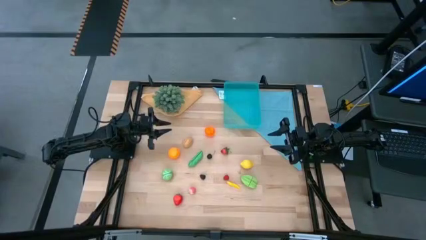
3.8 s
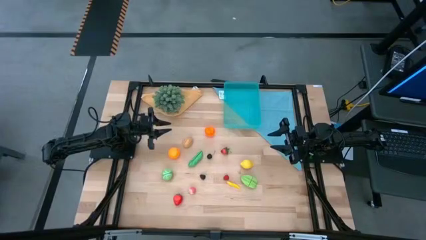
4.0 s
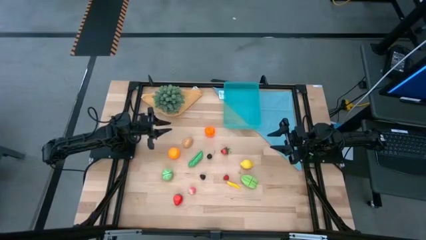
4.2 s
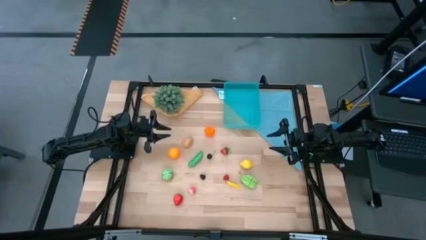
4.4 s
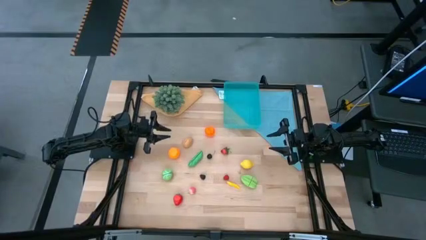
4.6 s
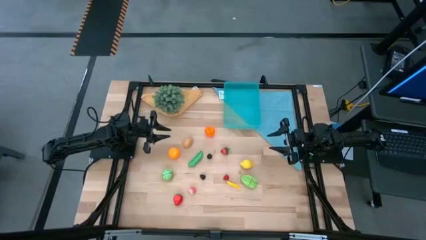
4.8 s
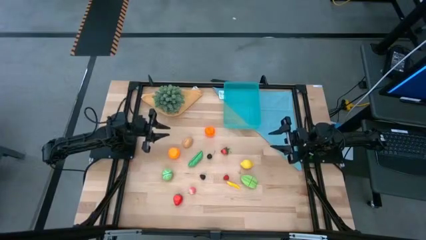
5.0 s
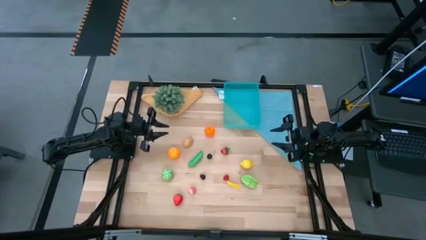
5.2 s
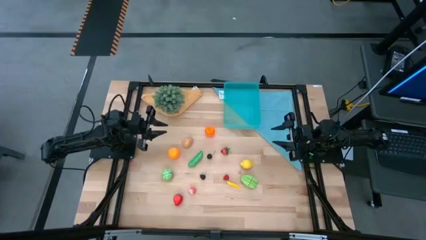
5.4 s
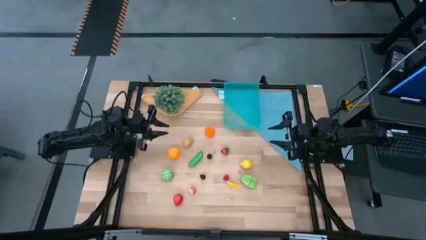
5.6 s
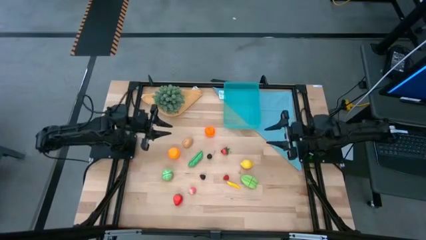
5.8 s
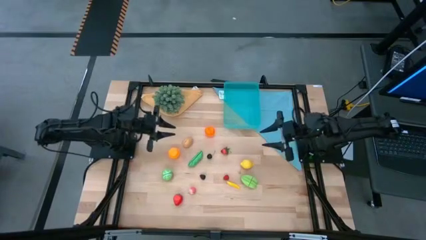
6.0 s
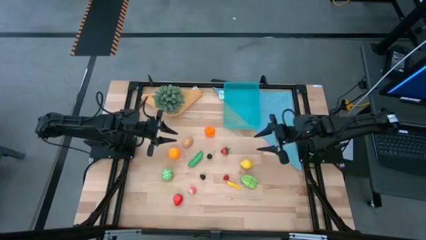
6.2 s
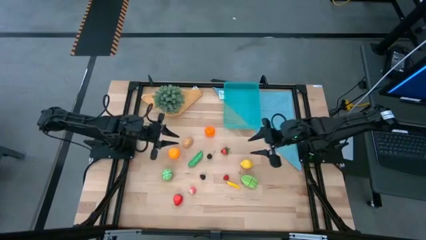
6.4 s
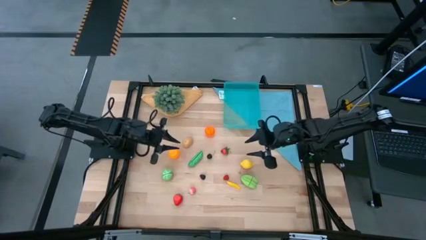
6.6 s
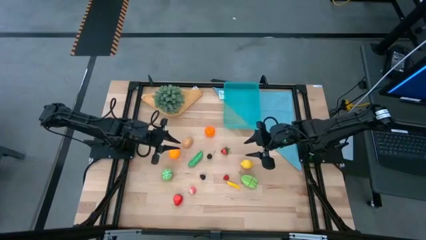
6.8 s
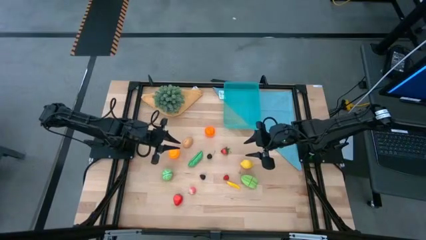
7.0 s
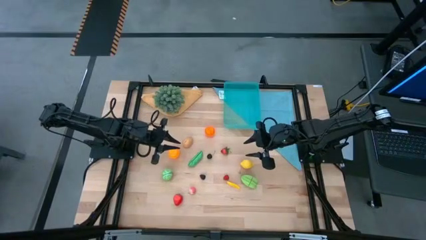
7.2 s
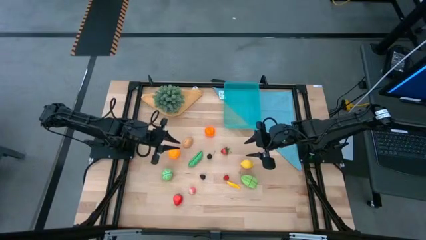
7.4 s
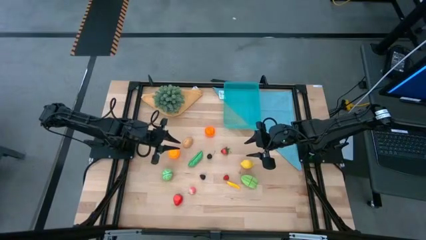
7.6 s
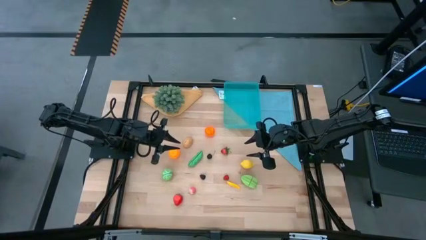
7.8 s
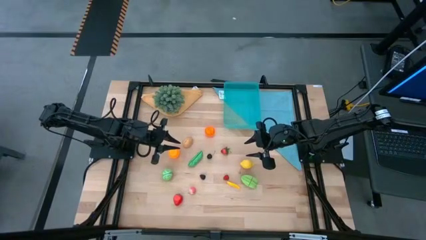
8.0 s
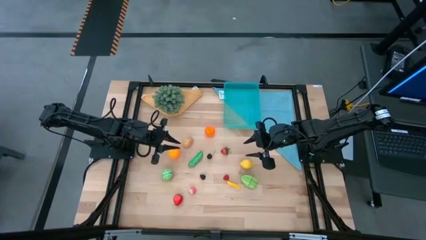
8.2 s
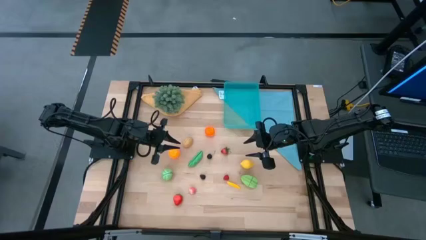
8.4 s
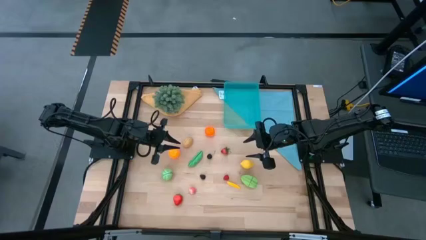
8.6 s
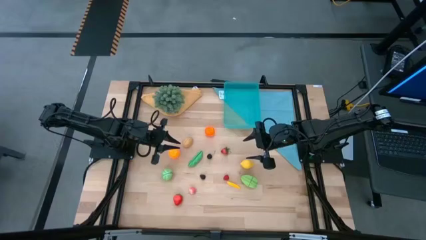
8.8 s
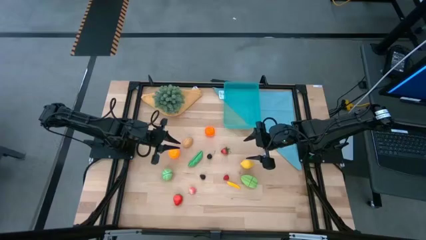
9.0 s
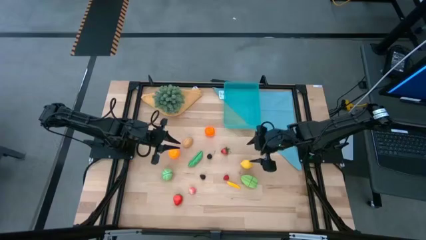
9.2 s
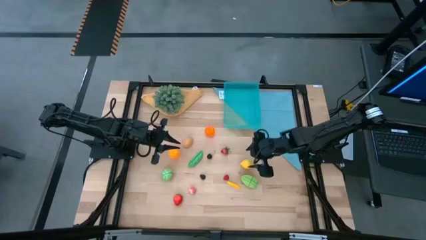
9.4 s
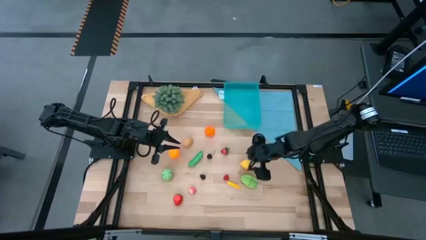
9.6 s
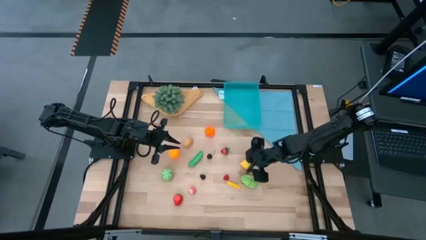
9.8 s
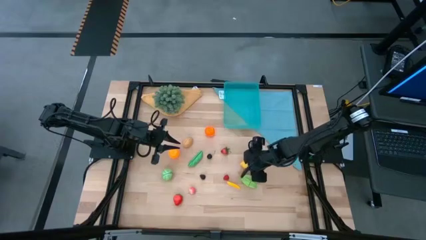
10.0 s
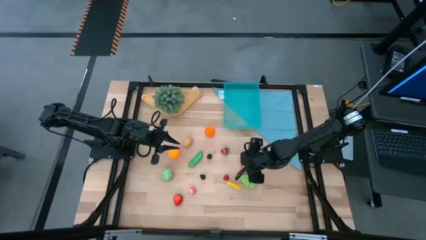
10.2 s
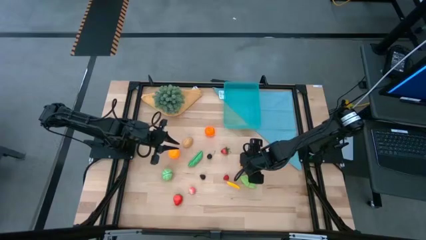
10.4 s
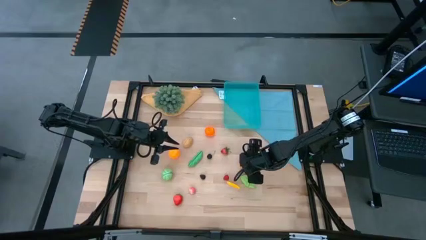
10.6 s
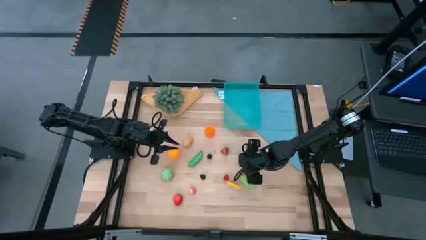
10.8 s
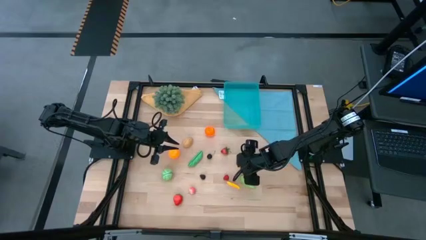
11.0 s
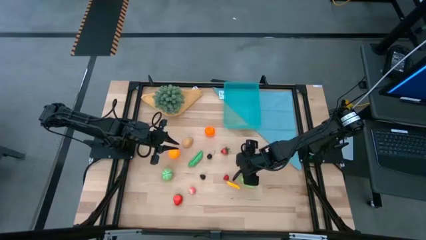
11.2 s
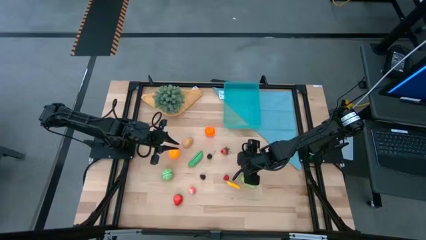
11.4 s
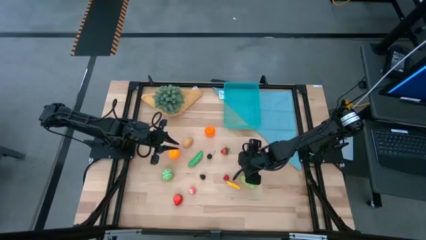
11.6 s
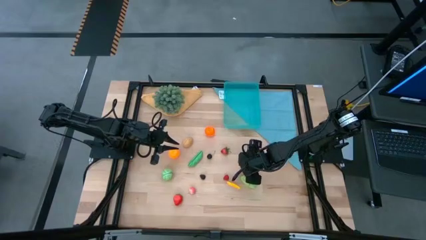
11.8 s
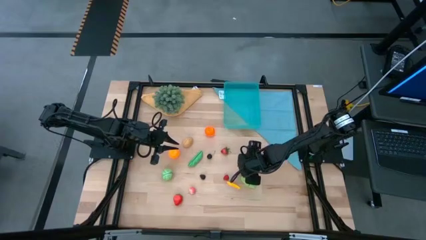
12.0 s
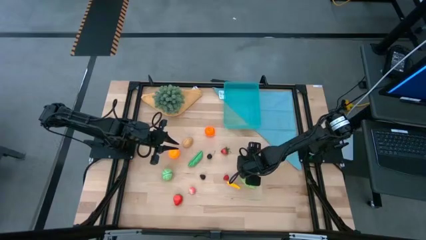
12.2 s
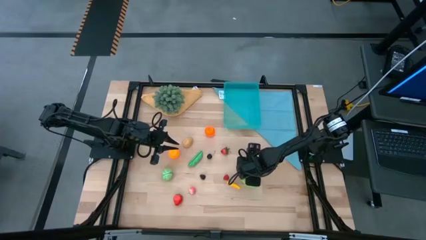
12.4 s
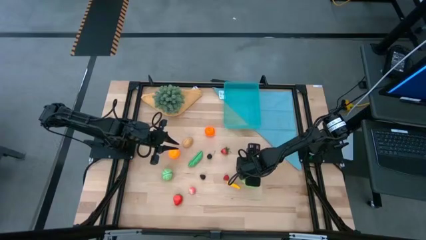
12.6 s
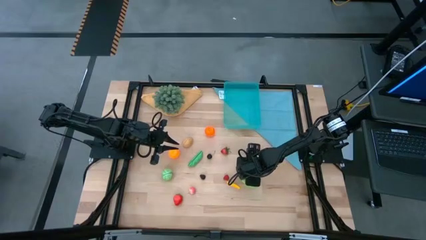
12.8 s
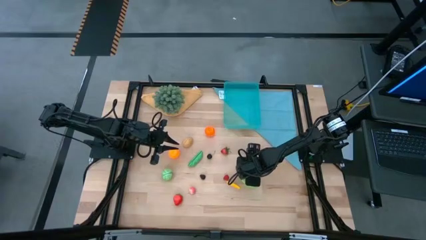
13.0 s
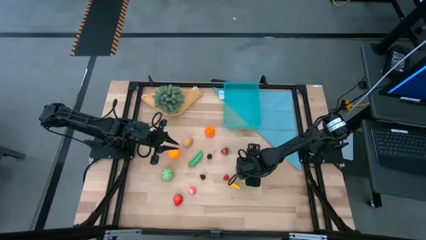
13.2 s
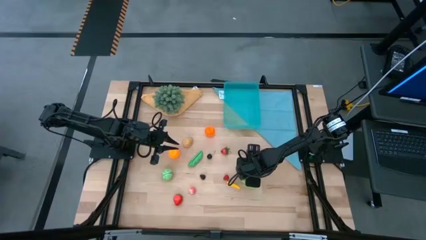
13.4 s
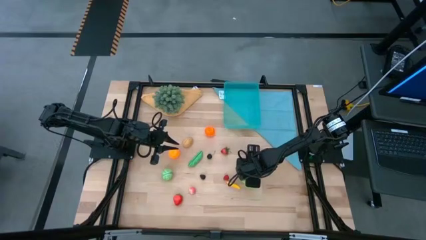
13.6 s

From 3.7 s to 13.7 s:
Task: Pick and placing Produce into tupperware
Put the yellow lemon into the blue bin

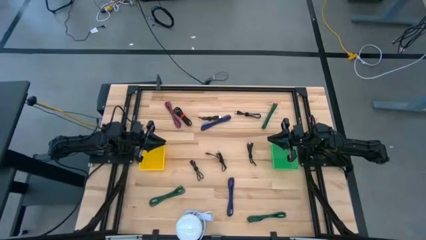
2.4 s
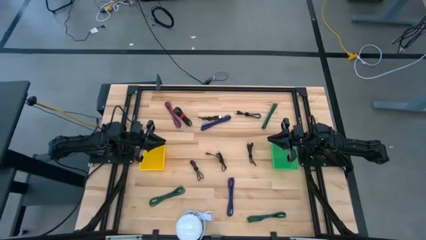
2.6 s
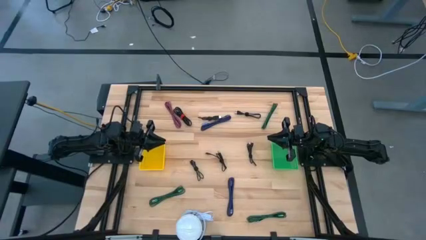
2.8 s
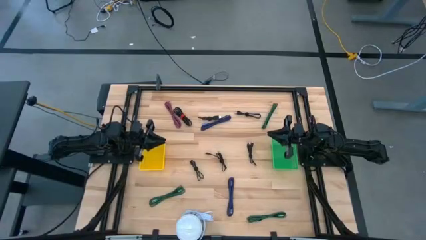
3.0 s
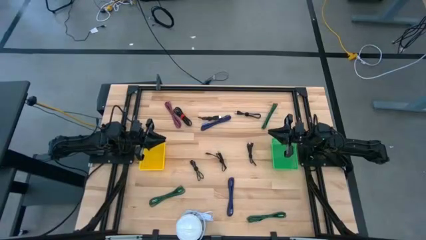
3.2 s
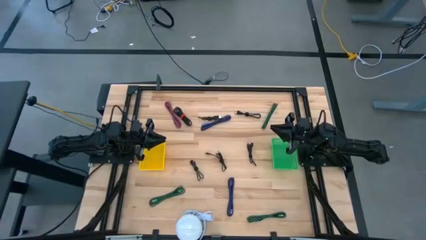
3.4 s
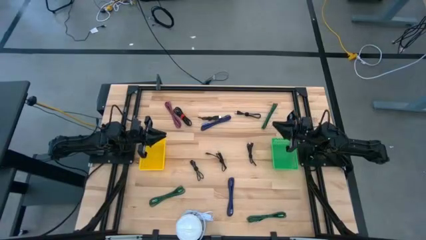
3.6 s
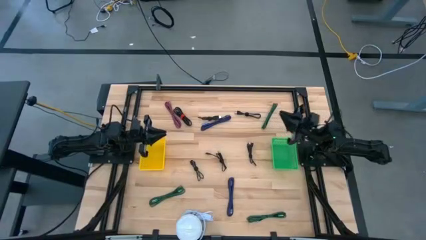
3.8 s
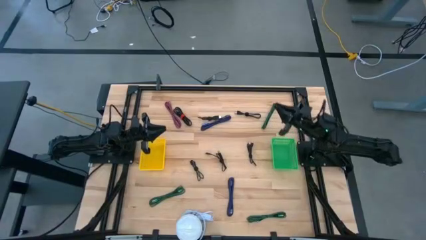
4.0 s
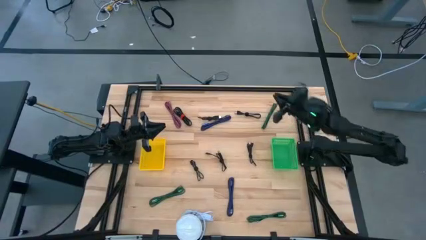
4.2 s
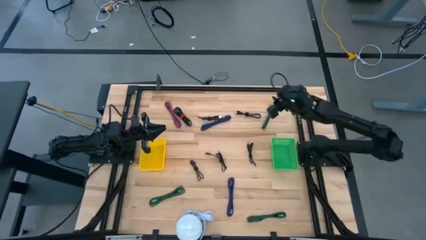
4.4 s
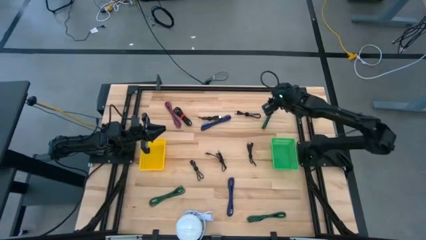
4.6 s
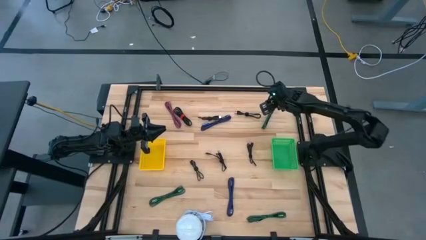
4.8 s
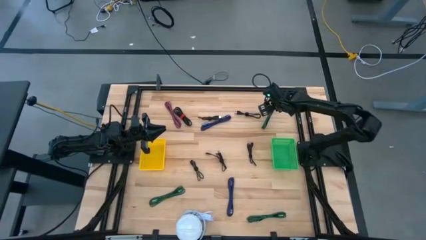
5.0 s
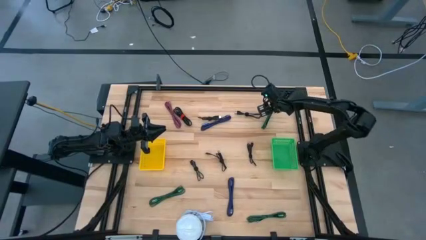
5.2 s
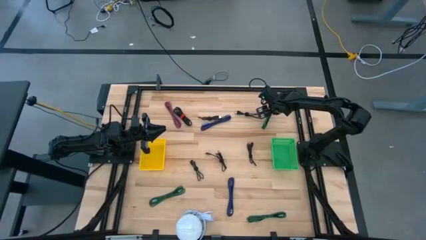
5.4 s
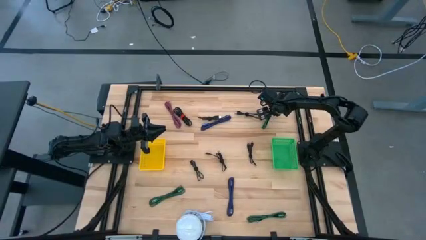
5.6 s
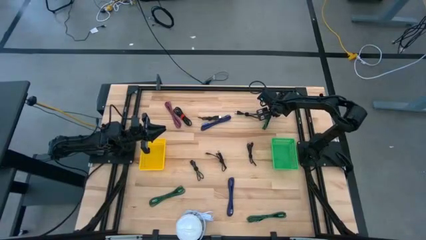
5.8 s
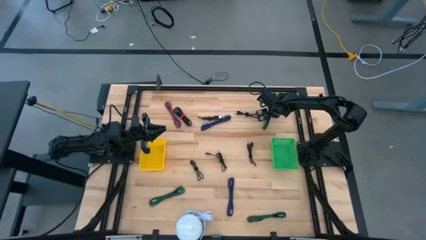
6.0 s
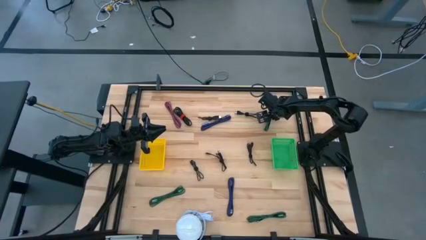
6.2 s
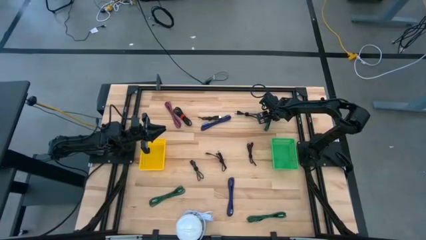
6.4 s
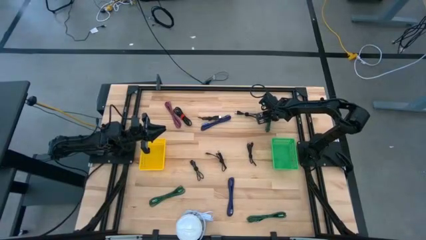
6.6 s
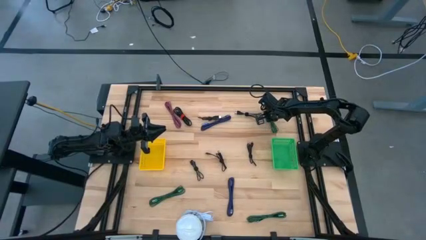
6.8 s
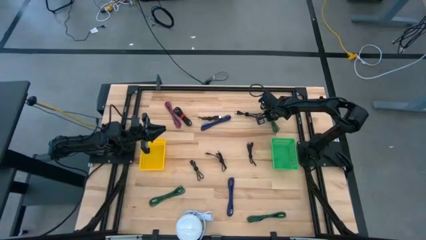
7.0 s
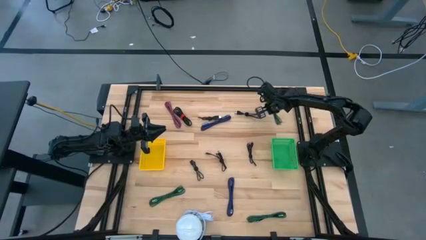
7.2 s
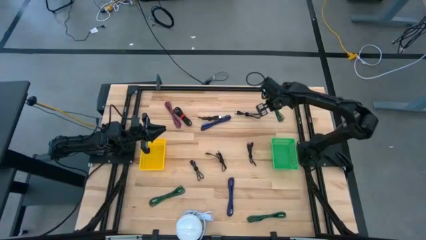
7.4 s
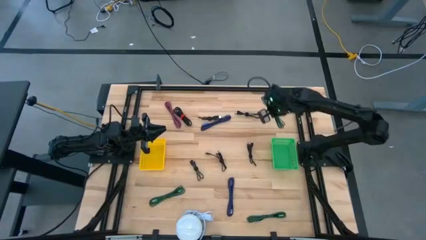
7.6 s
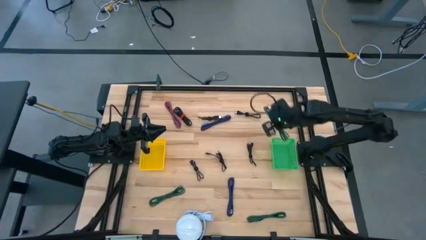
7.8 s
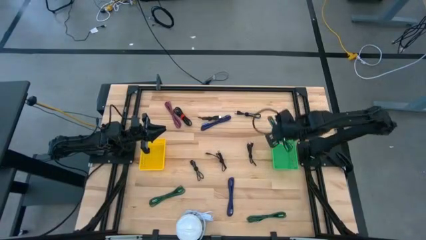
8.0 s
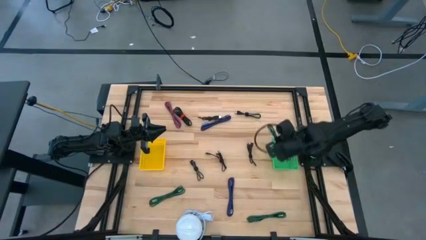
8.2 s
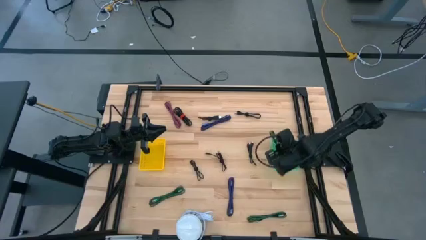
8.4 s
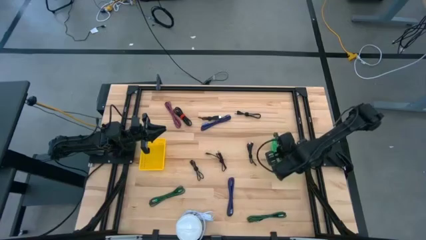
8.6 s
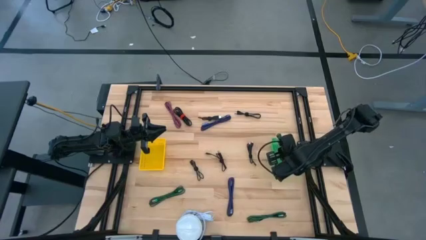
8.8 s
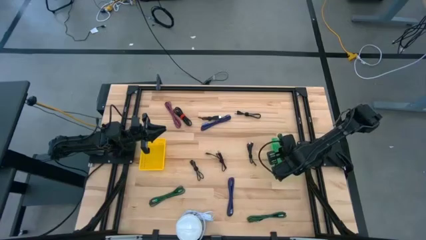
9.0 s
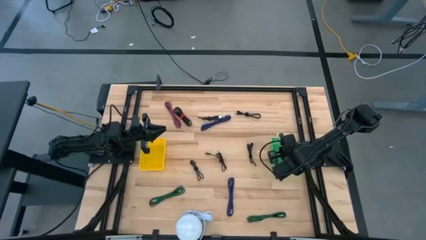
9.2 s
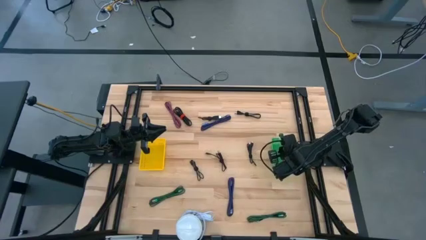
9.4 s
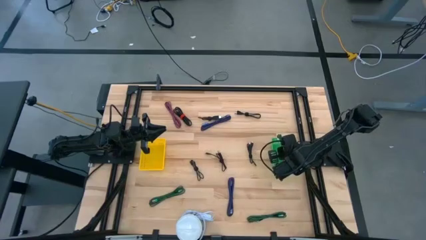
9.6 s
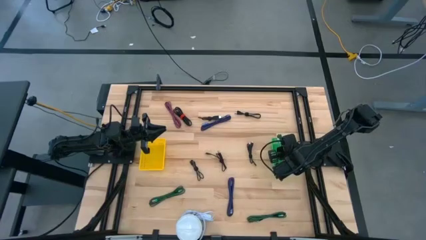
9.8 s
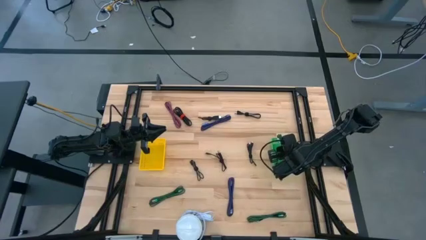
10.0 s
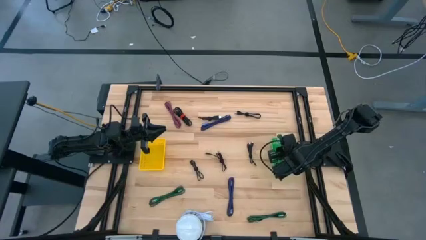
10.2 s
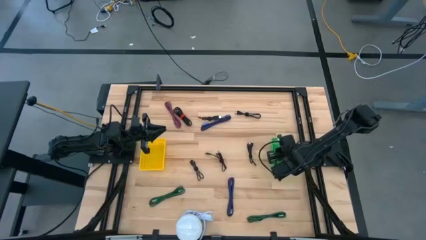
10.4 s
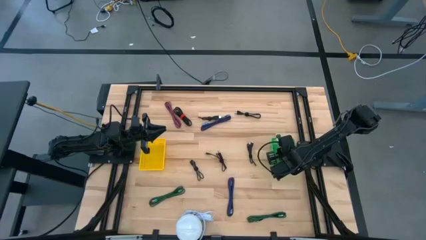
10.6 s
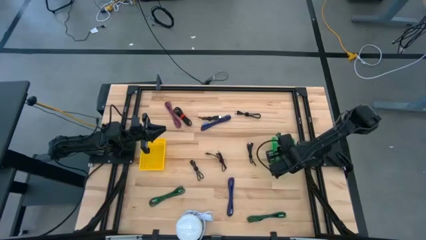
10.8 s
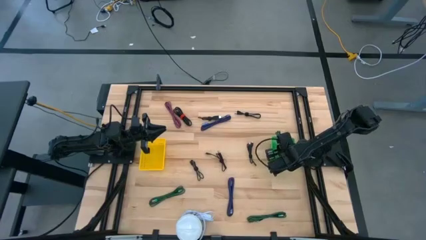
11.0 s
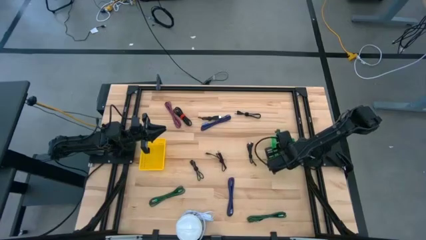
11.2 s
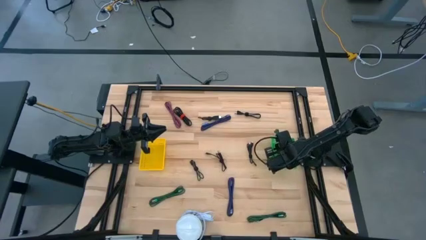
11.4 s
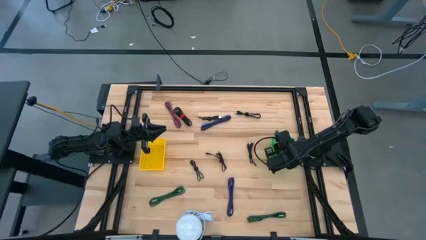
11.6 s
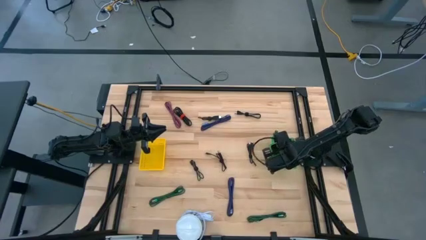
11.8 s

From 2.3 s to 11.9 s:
Task: Pick & Place USB Port
Put the black and green charger cable into the green basket
